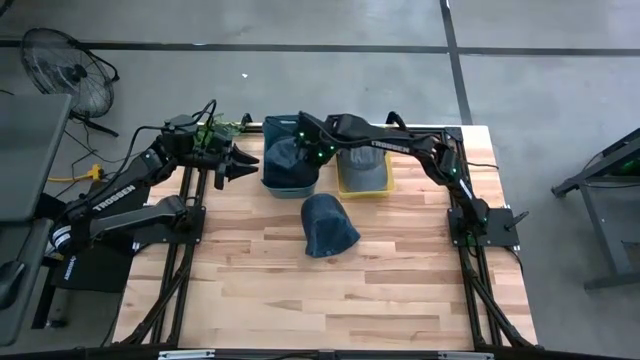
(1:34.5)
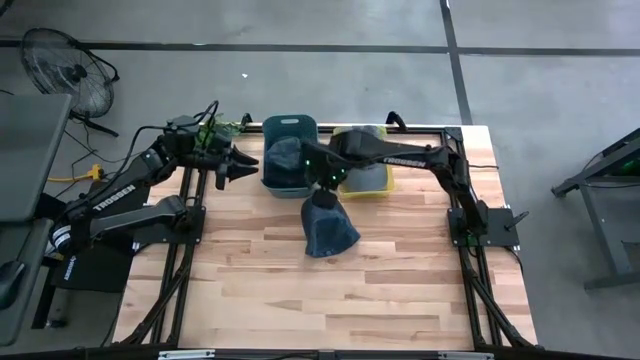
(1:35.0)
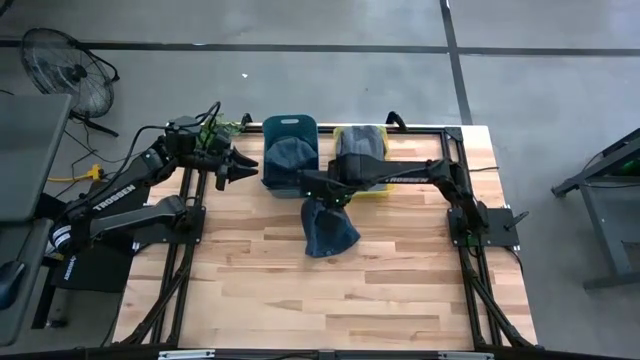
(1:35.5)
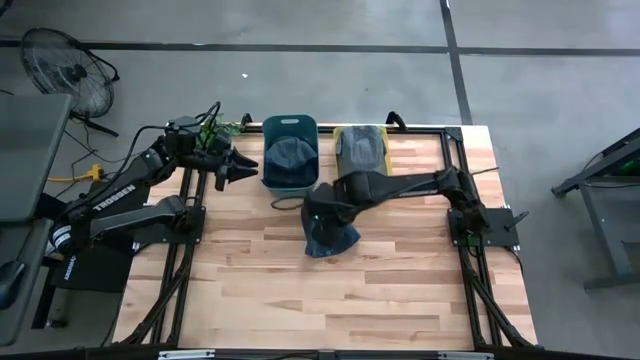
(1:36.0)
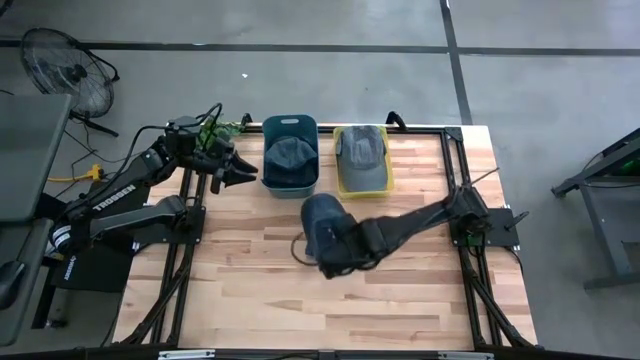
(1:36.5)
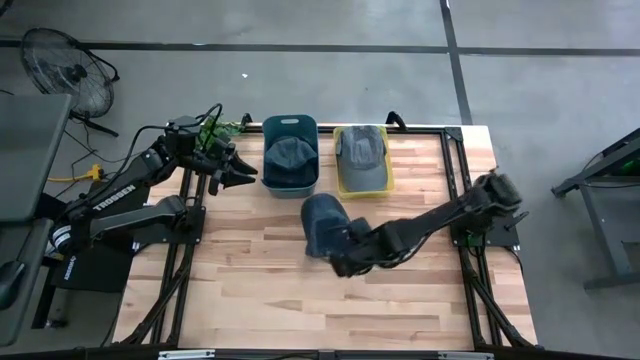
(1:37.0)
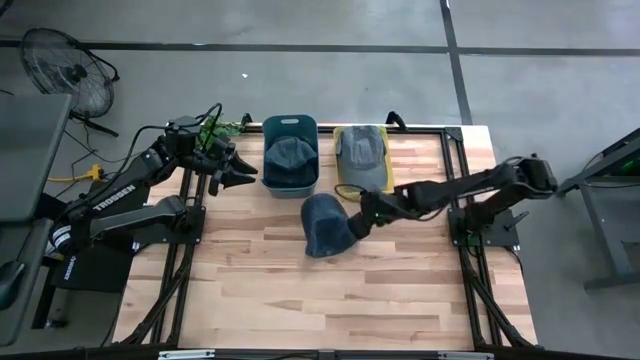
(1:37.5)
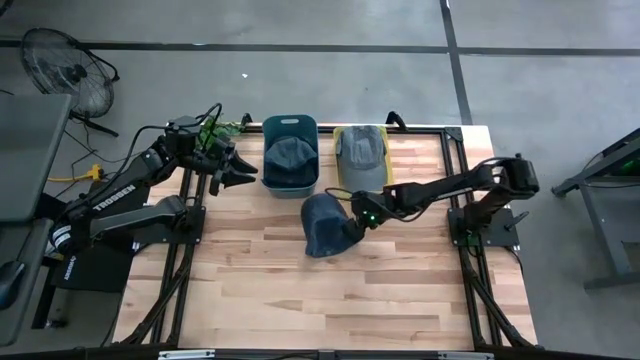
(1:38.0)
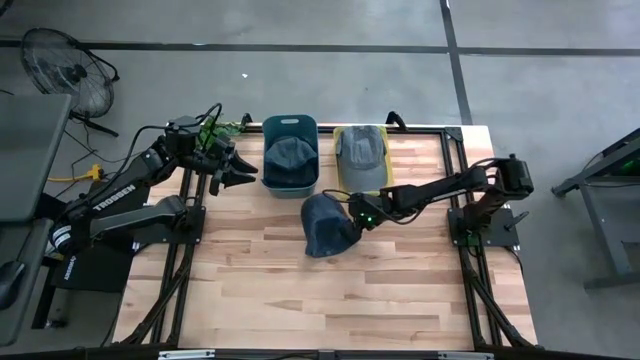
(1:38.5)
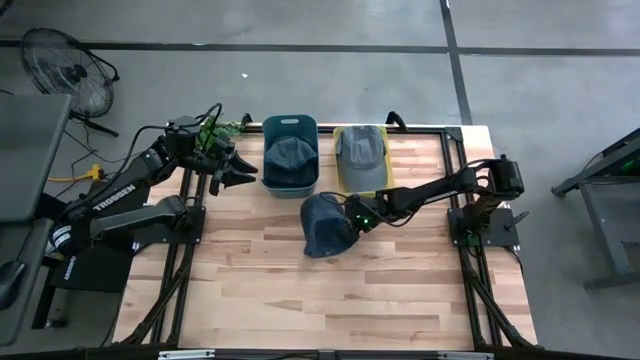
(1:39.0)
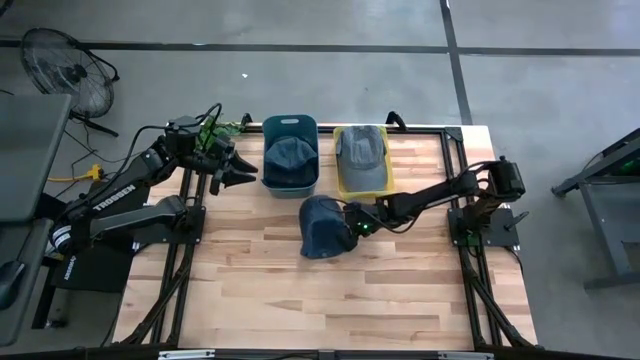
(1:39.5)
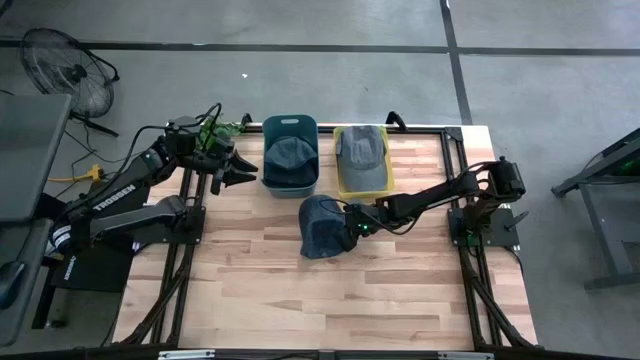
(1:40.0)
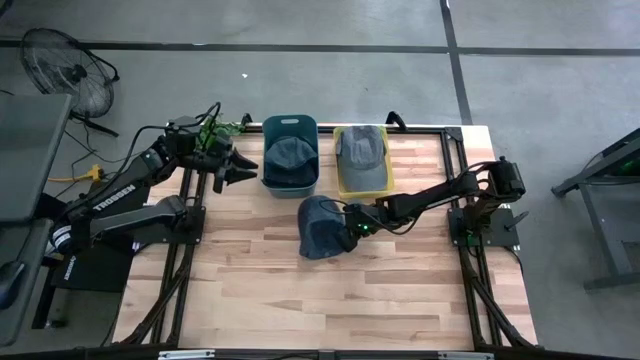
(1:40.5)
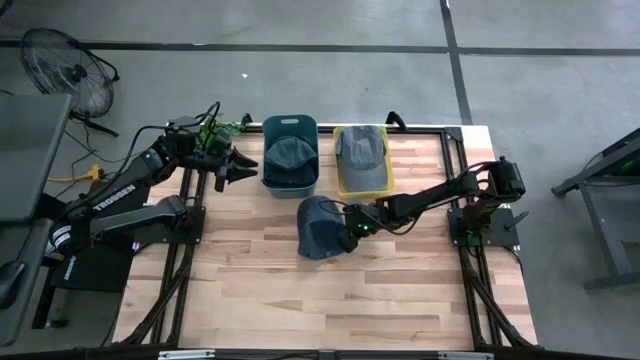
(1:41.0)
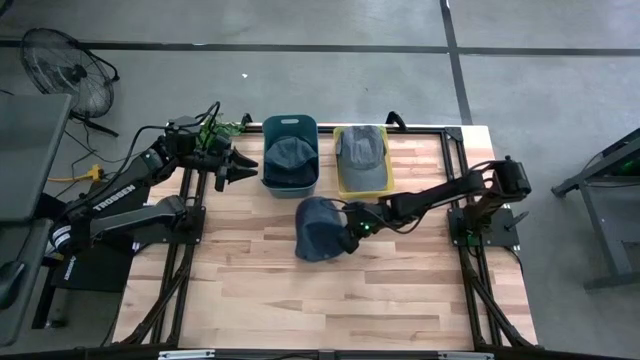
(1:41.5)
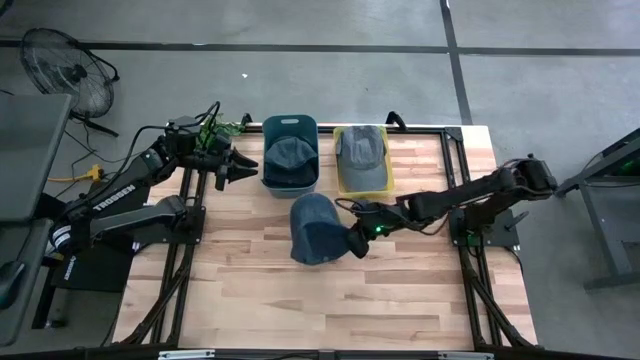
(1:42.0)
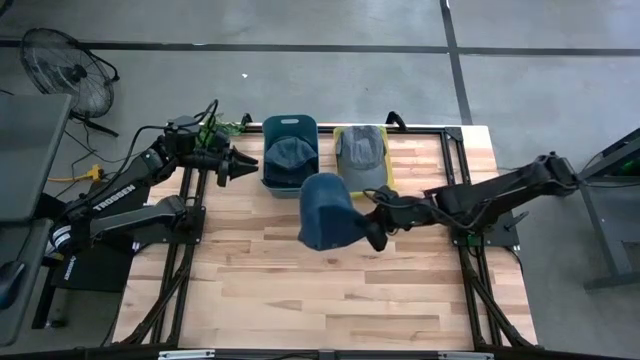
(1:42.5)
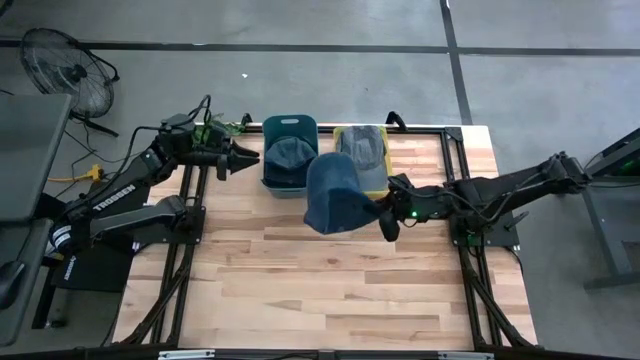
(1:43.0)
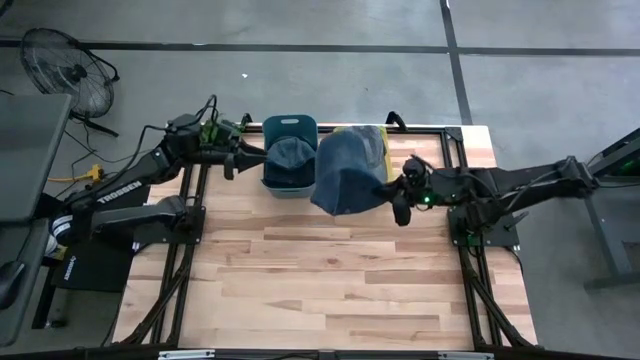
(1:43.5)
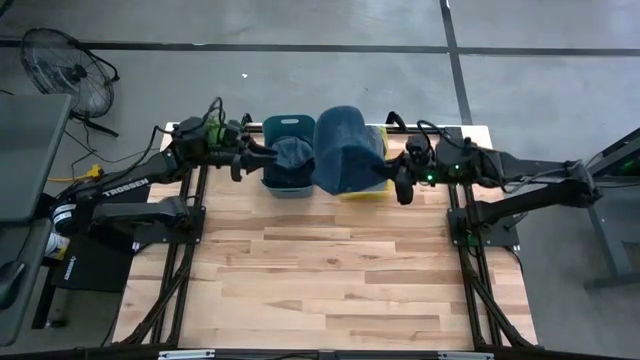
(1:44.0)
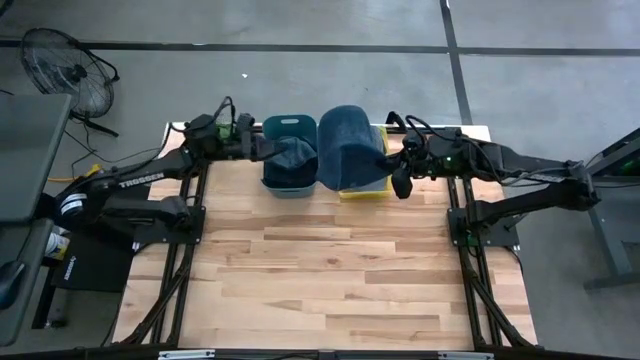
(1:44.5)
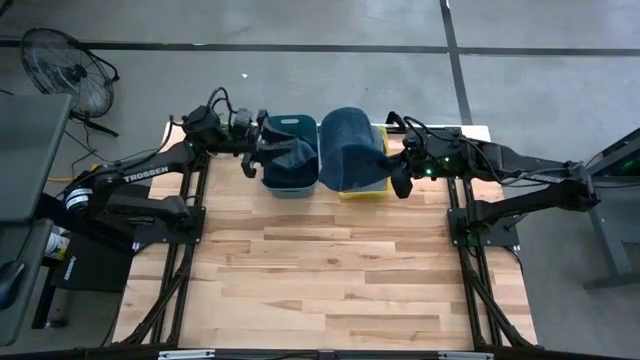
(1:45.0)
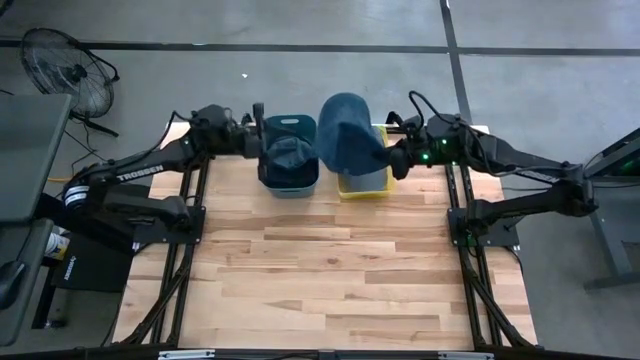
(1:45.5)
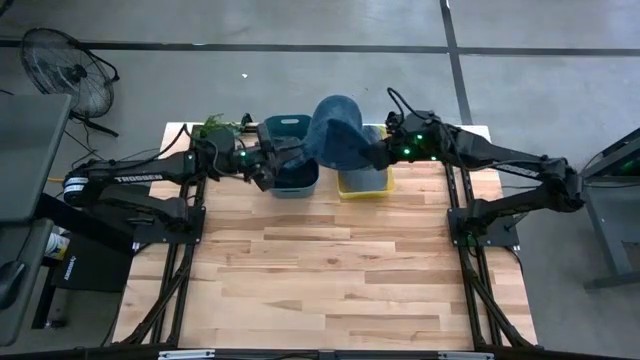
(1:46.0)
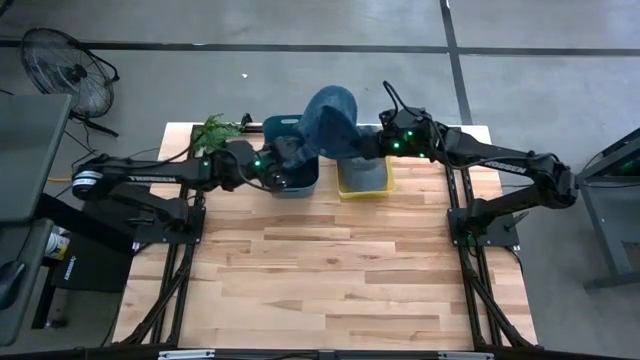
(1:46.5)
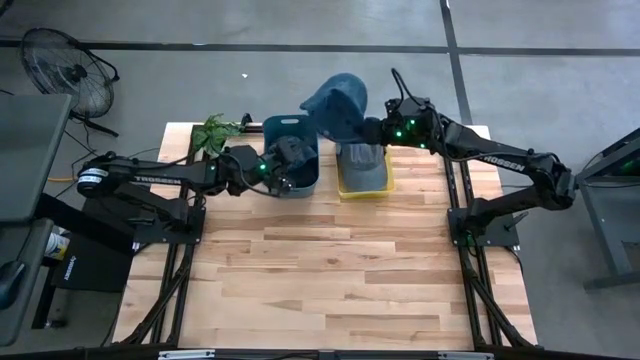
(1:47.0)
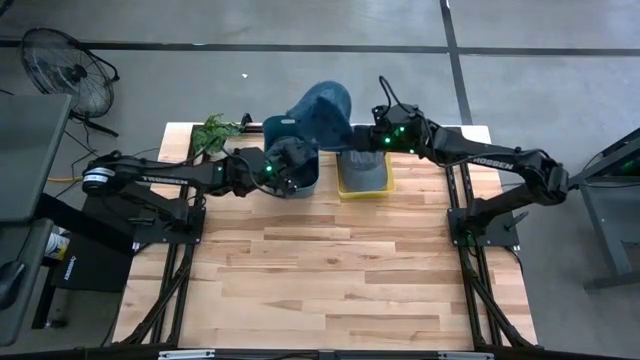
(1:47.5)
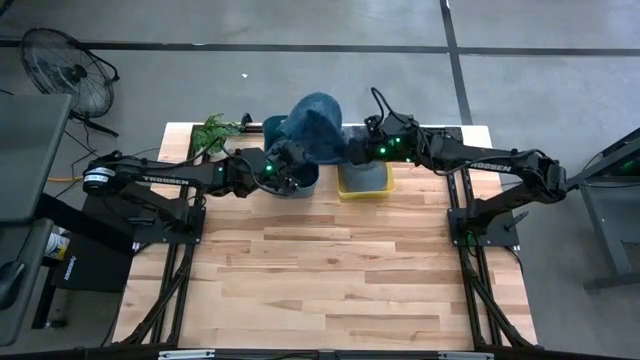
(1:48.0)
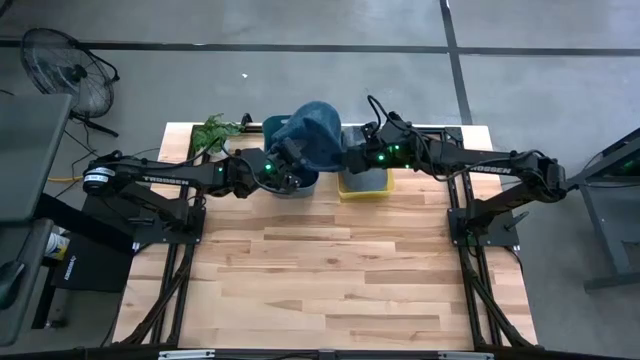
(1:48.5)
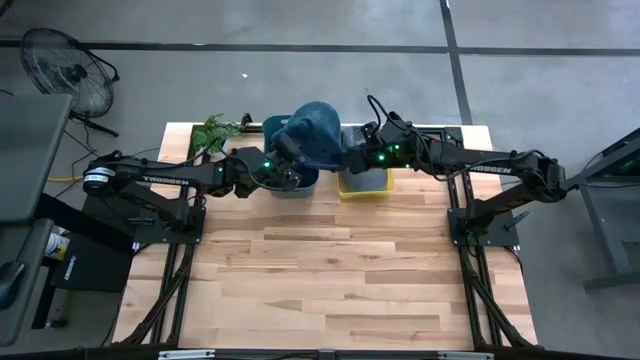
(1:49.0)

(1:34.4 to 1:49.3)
Task: Pick & Place hat
Put the blue cap into the blue bin

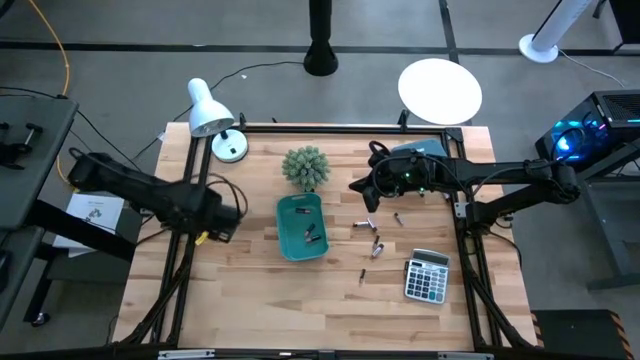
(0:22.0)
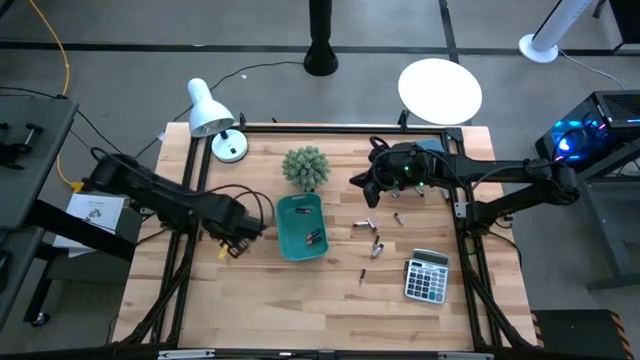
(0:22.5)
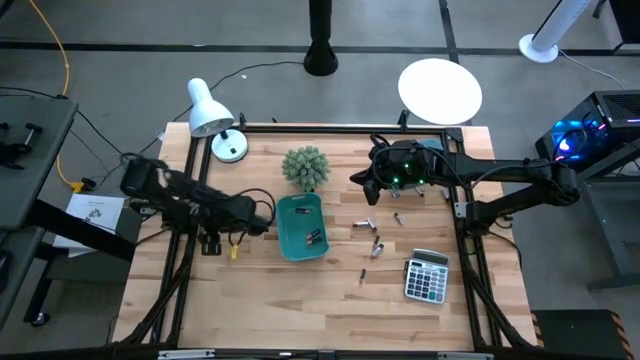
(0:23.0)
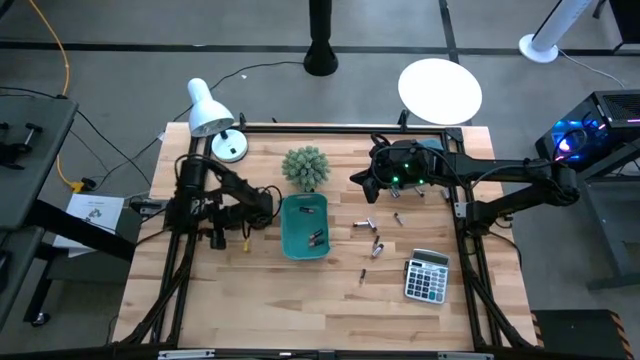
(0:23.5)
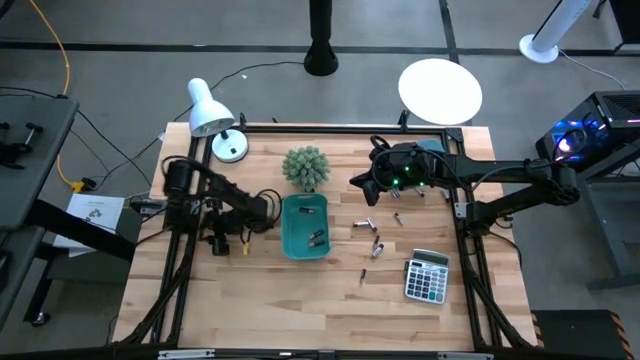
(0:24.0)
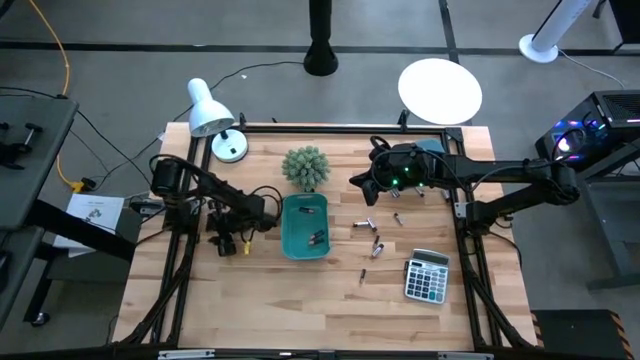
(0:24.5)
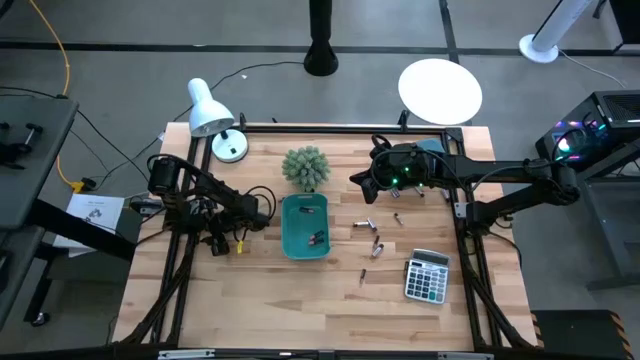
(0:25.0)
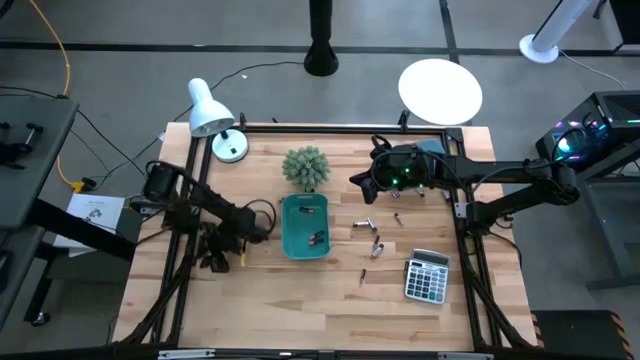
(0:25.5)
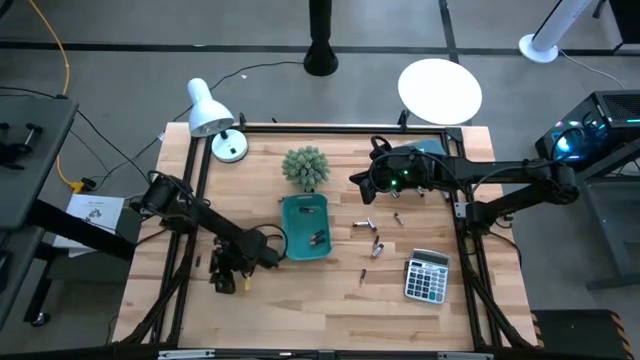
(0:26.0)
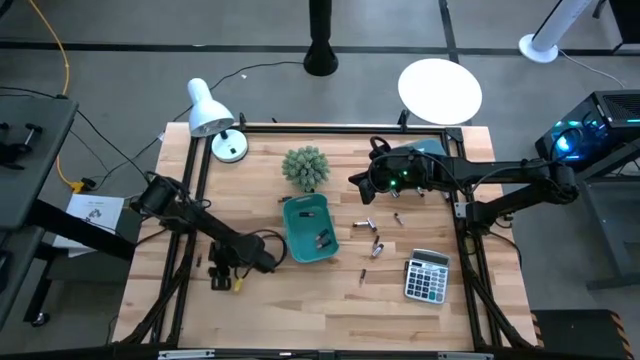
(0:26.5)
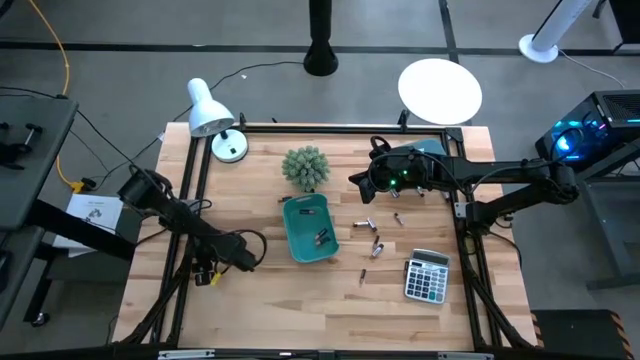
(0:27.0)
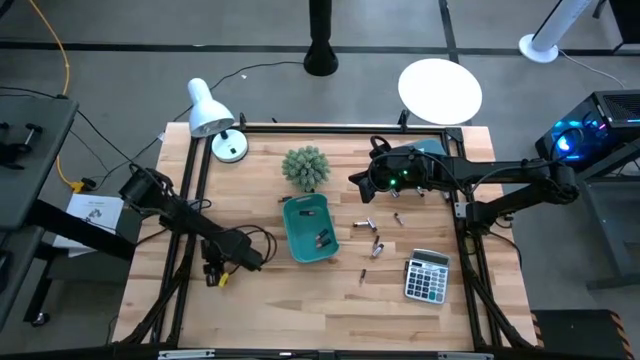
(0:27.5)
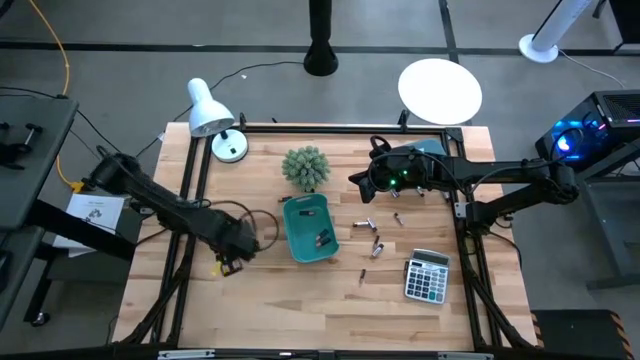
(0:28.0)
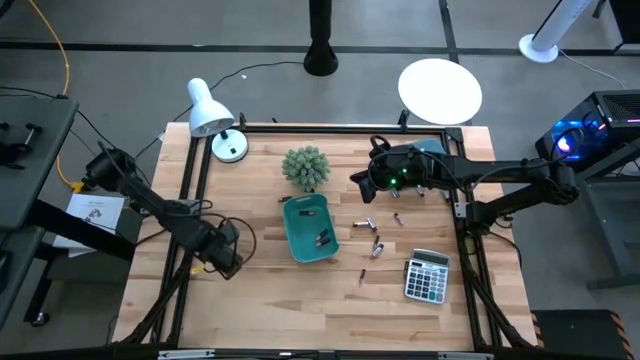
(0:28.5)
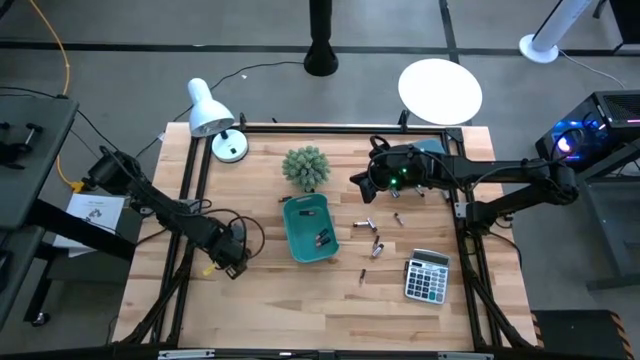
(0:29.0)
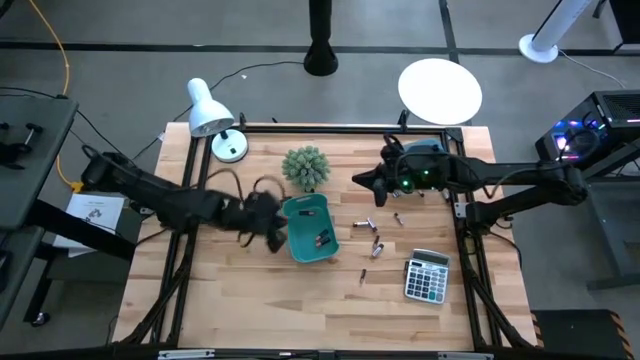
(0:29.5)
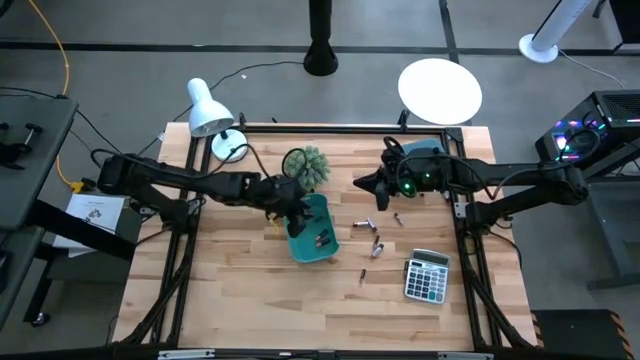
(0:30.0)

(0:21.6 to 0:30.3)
Task: Sort batteries
Put the black battery into the green bin
